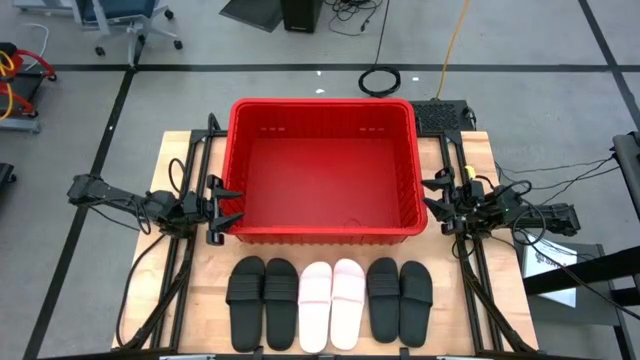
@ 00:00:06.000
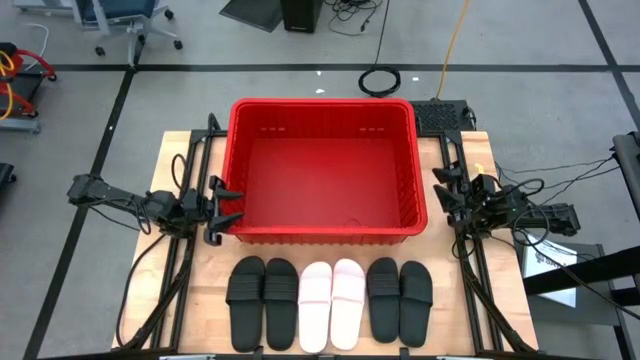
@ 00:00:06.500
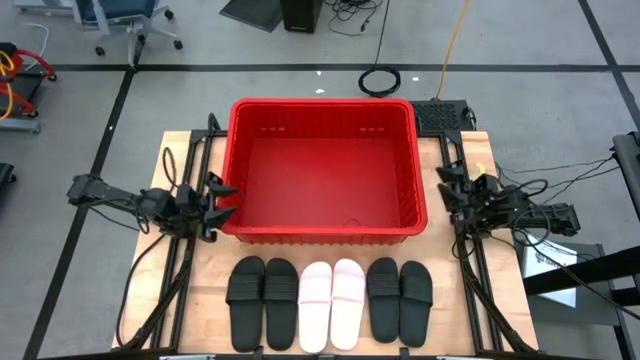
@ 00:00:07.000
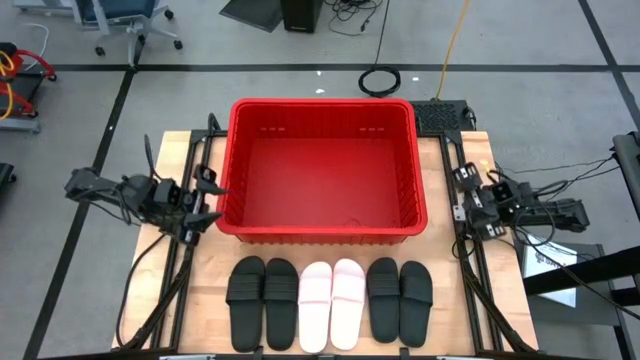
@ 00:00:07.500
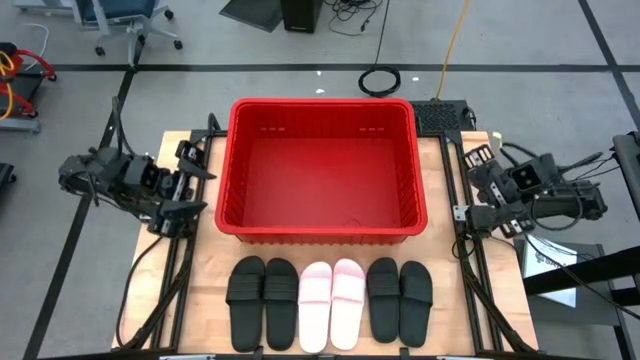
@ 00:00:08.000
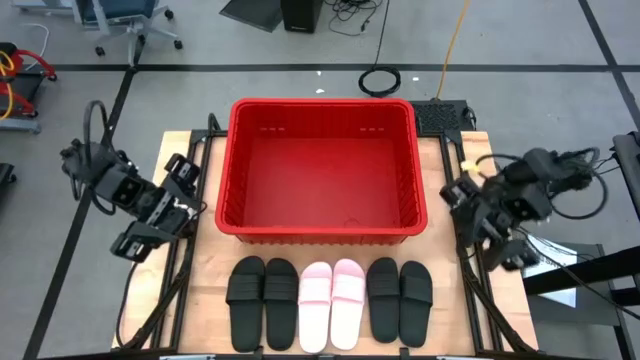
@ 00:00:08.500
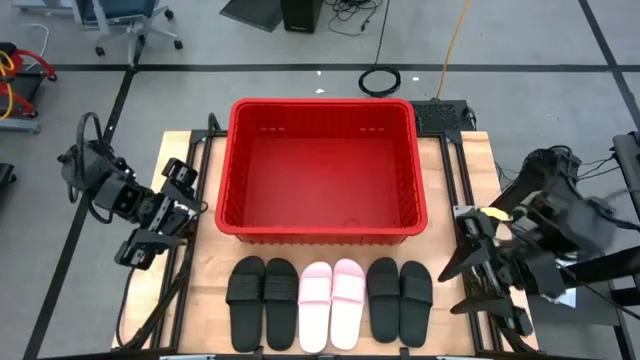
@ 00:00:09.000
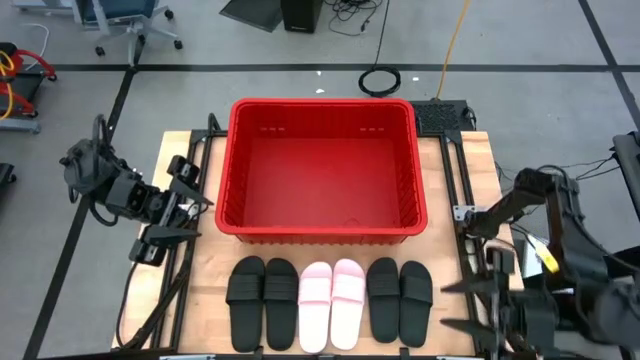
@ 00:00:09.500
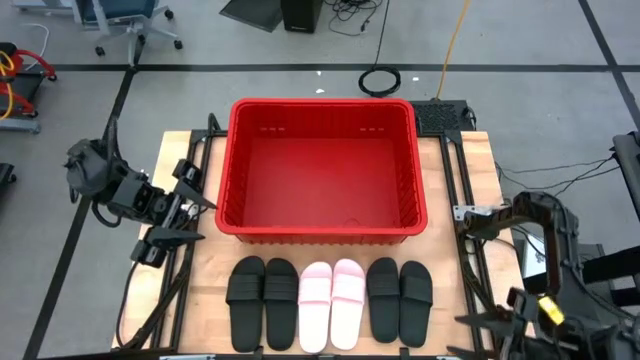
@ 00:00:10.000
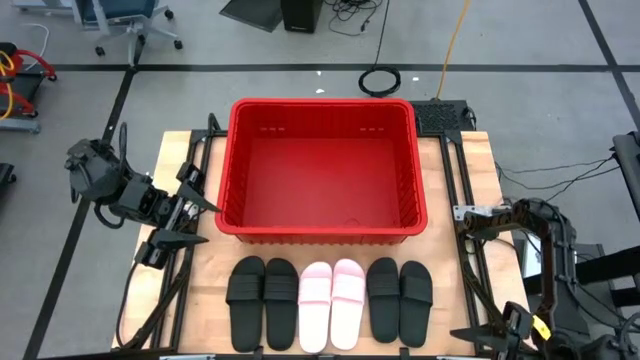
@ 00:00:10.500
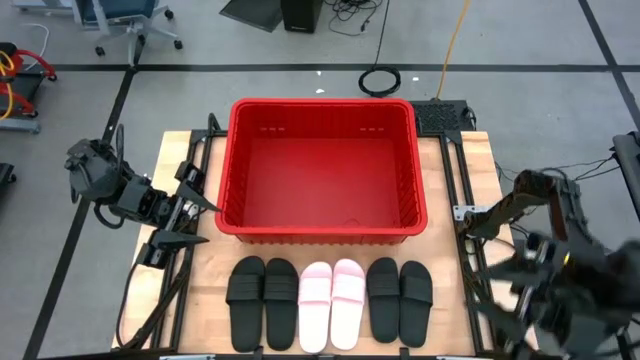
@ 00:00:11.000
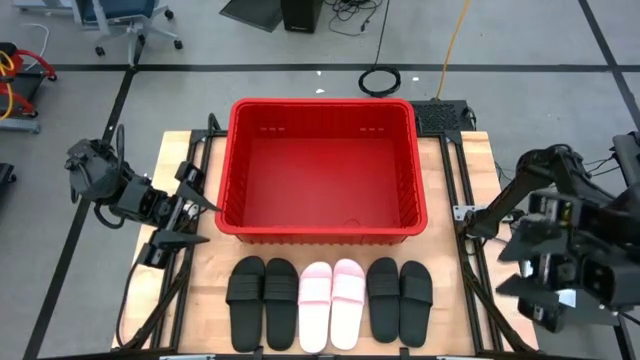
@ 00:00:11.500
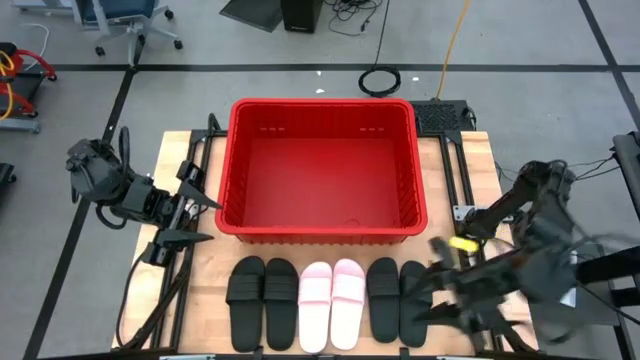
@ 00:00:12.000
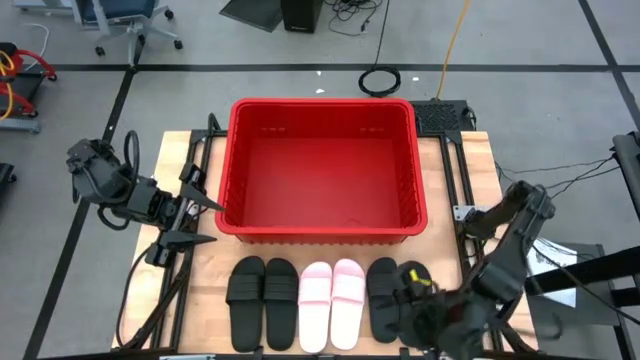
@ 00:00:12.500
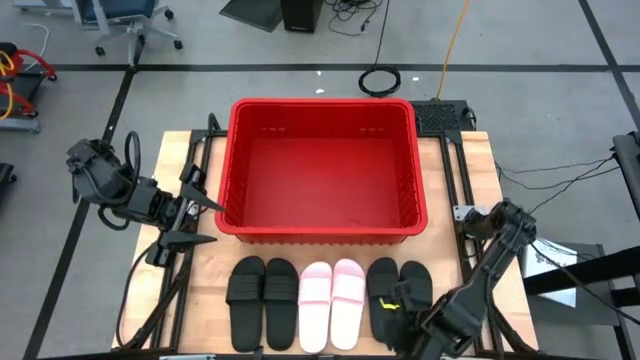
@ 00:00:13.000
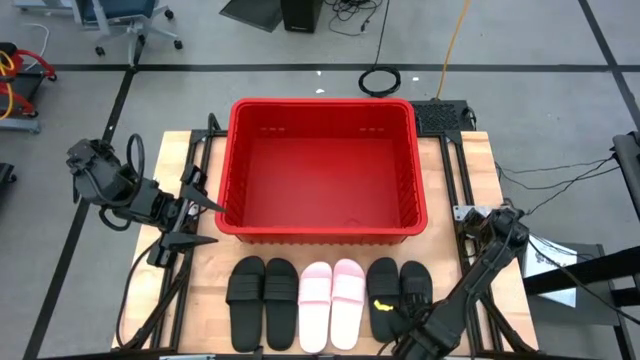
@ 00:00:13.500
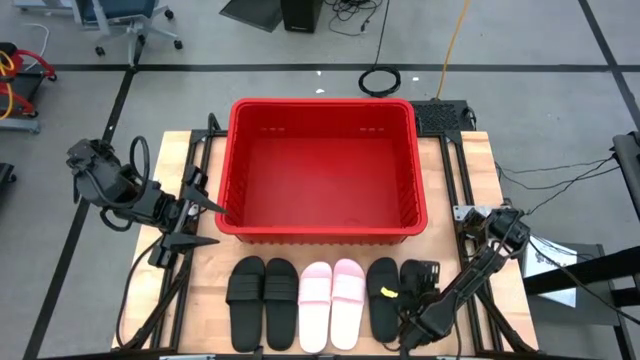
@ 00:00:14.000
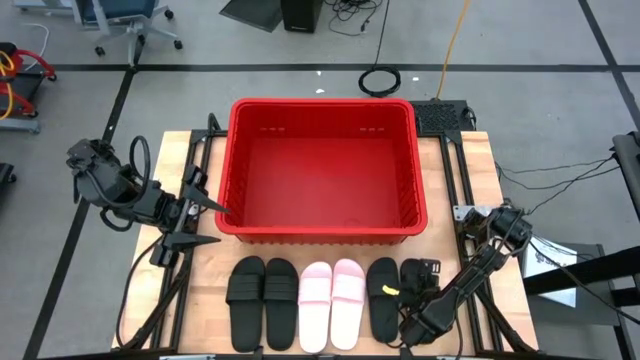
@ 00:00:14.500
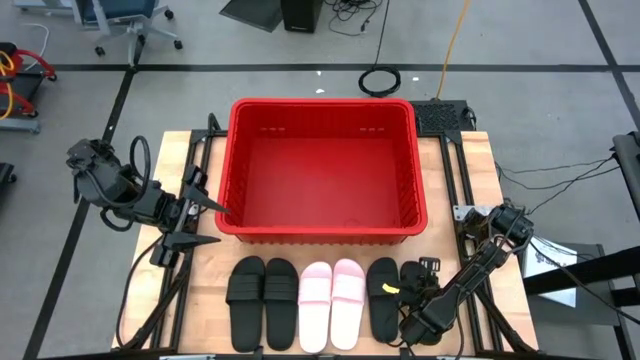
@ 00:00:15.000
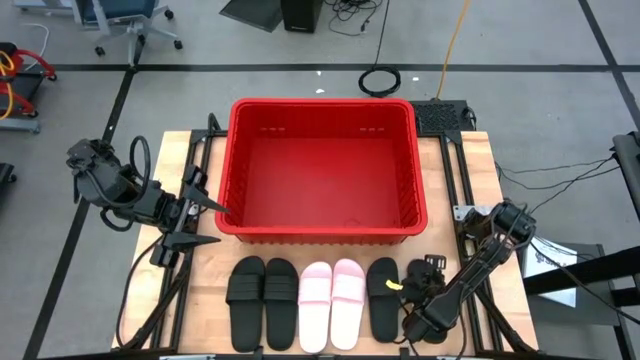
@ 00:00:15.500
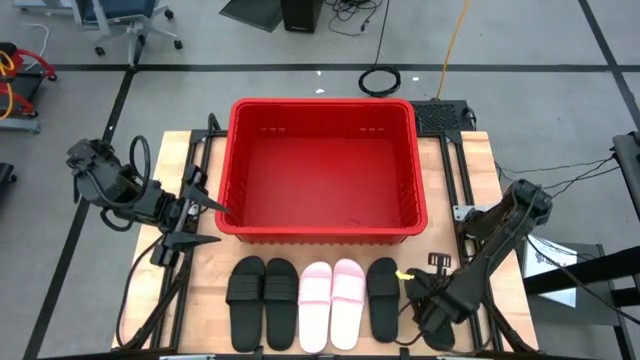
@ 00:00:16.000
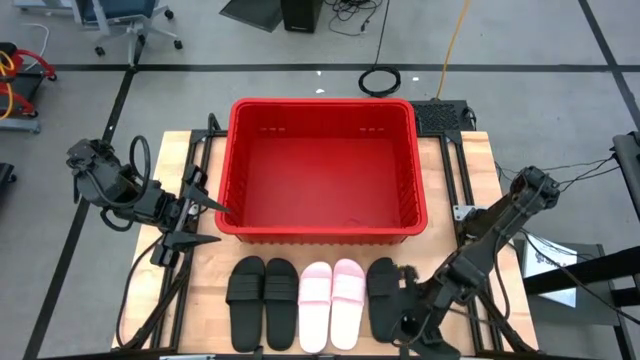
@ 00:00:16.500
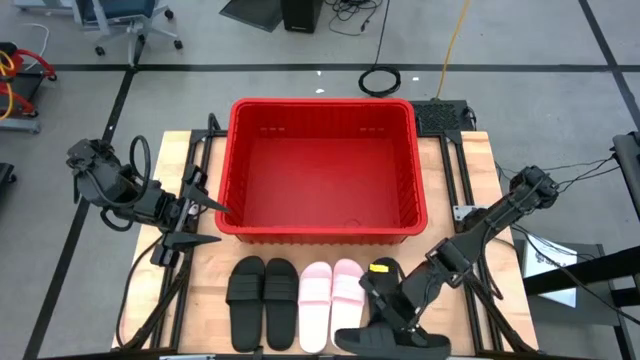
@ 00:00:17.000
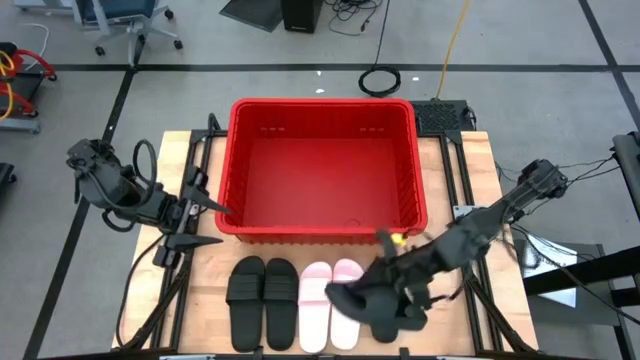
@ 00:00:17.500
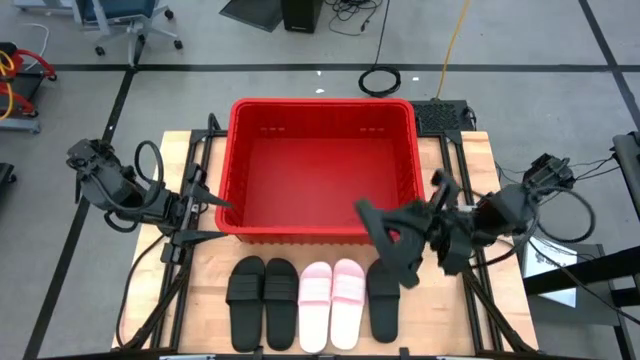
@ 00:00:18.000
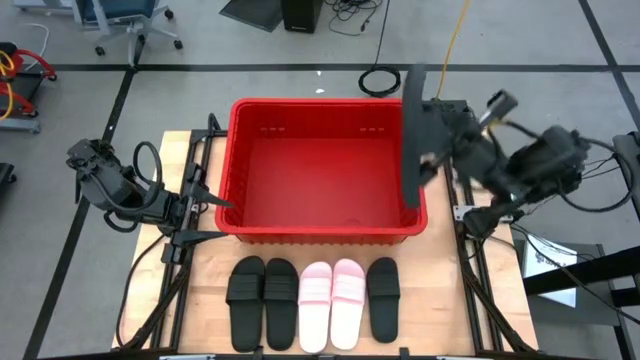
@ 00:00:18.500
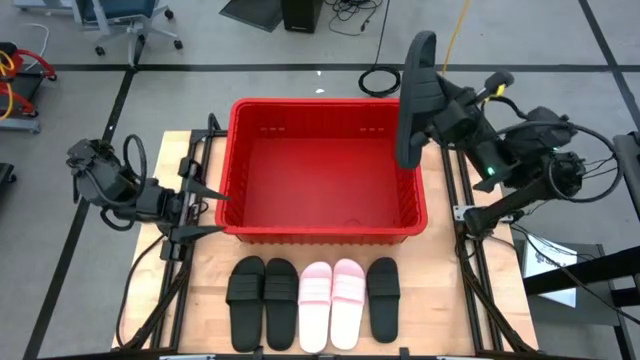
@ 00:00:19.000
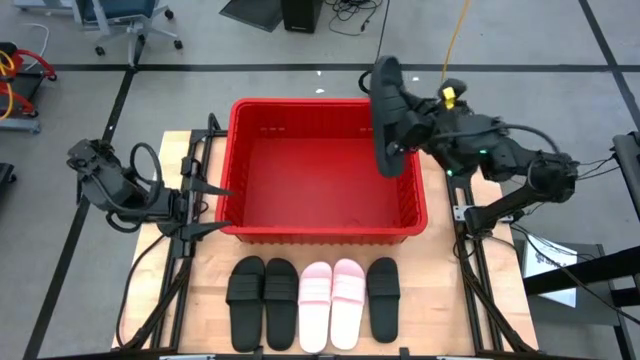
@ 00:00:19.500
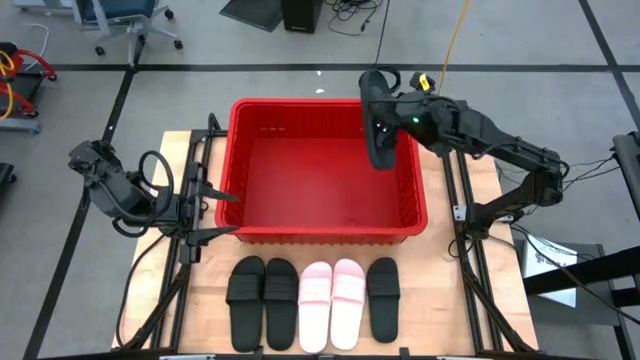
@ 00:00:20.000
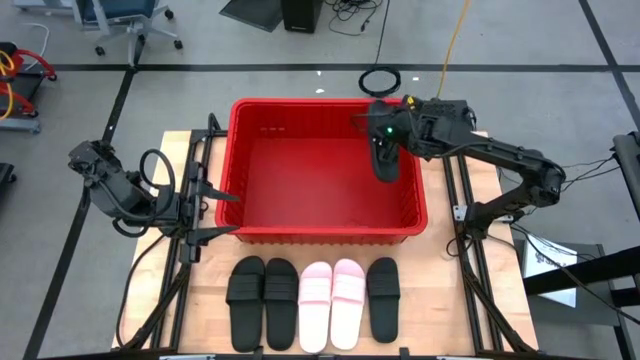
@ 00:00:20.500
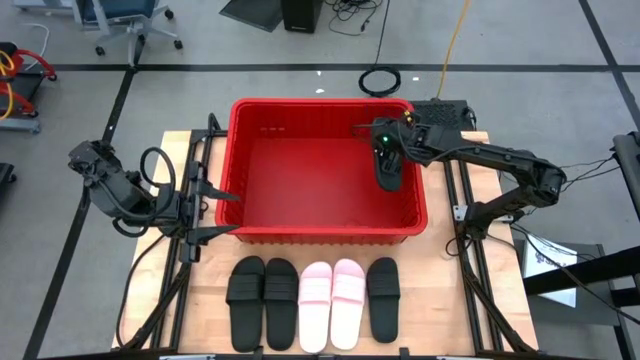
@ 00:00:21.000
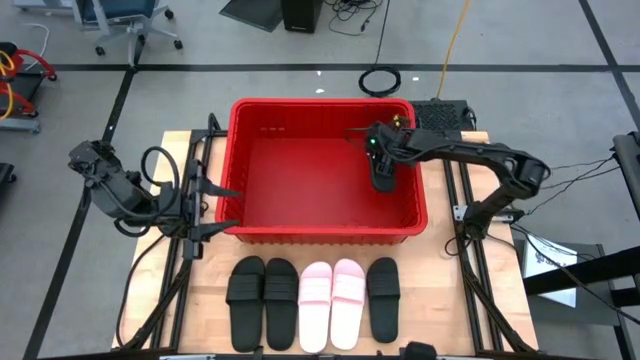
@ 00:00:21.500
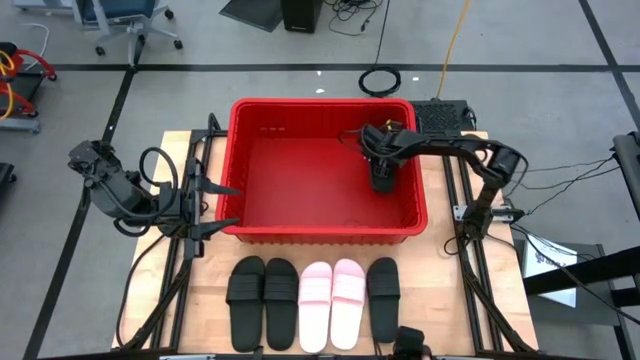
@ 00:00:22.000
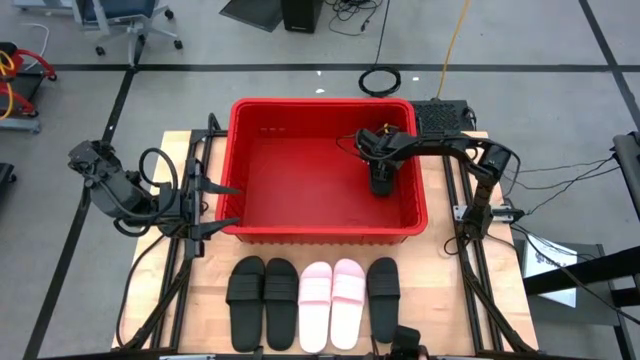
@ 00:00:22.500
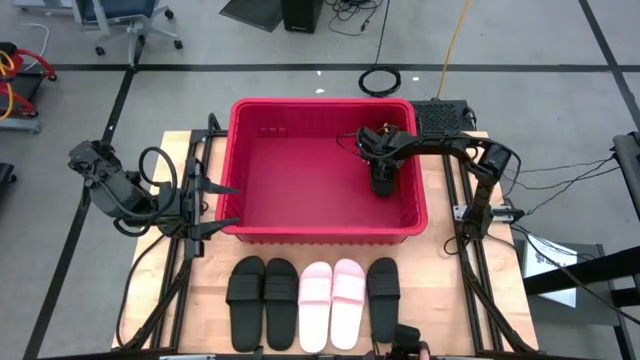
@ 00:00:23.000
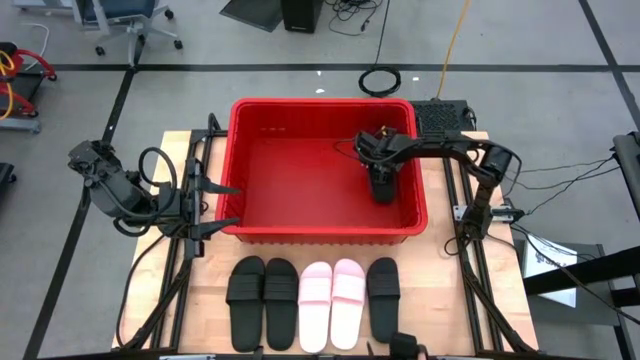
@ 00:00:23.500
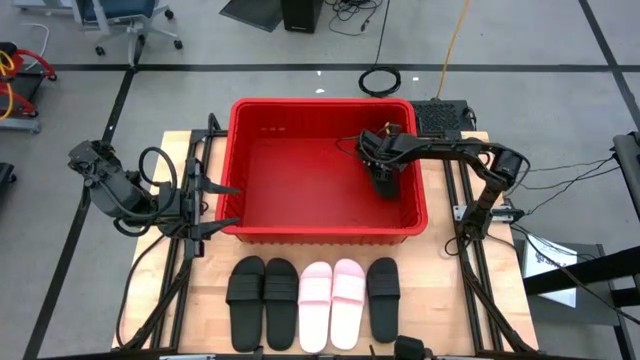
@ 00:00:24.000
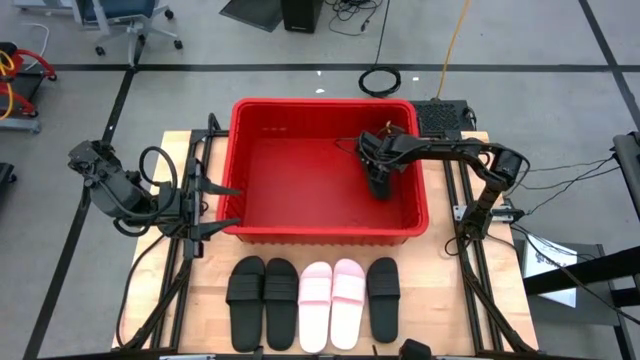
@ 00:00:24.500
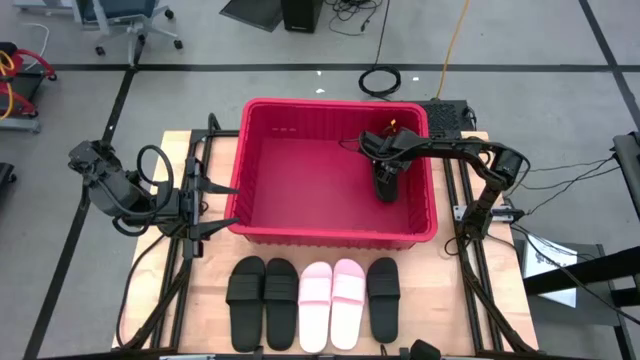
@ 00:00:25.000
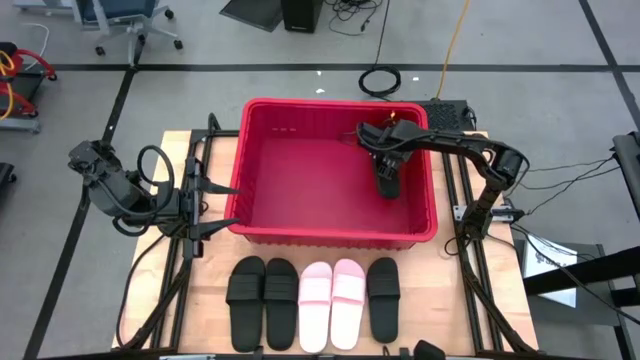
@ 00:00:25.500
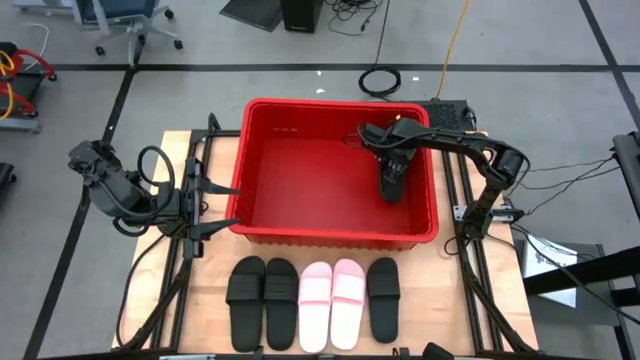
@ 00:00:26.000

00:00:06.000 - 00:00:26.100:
Task: Pick and place slides into bin
Put the black slide into the red organizer bin
